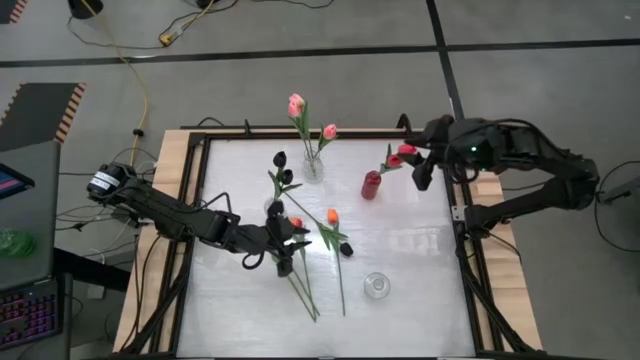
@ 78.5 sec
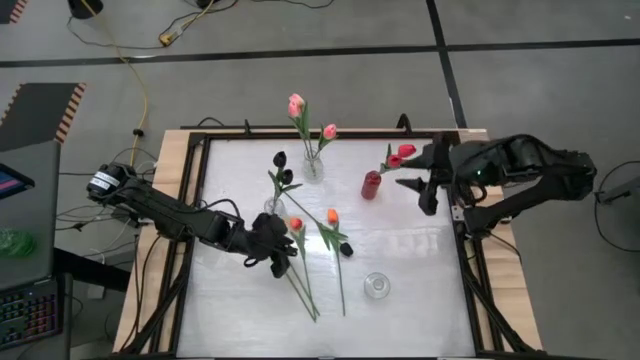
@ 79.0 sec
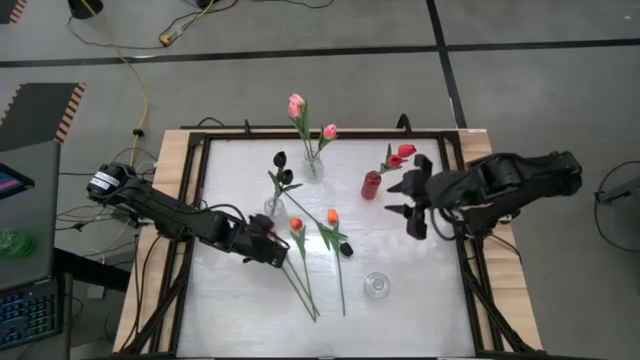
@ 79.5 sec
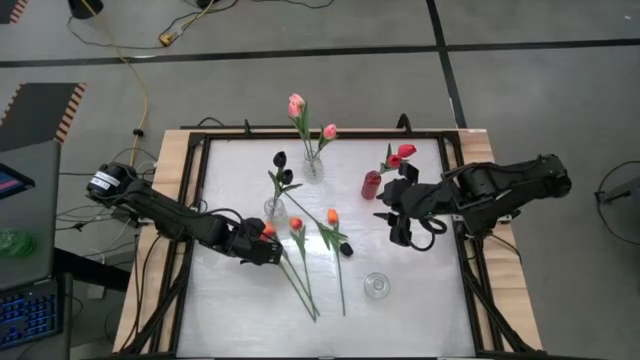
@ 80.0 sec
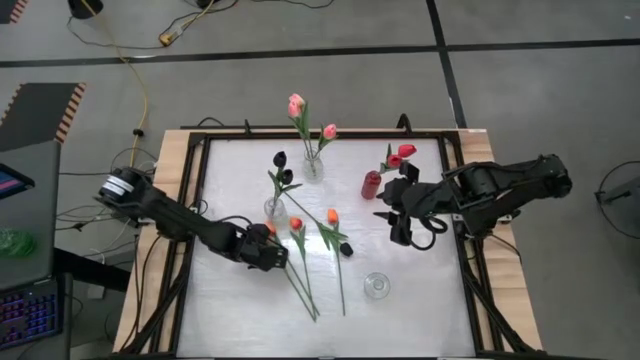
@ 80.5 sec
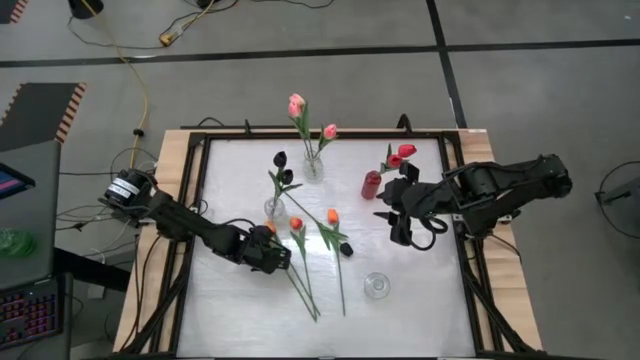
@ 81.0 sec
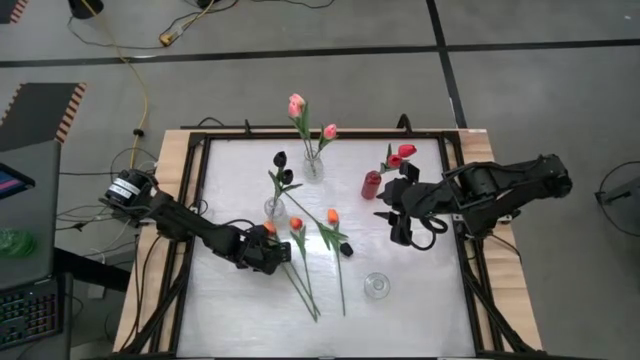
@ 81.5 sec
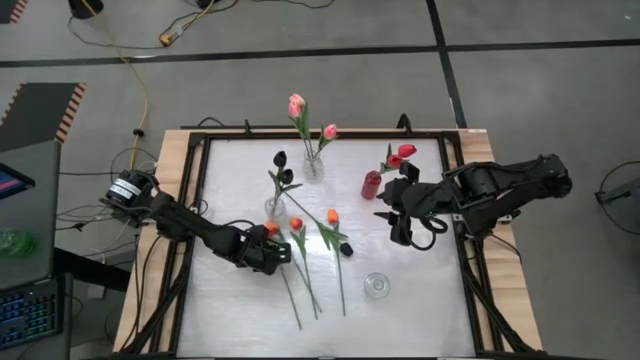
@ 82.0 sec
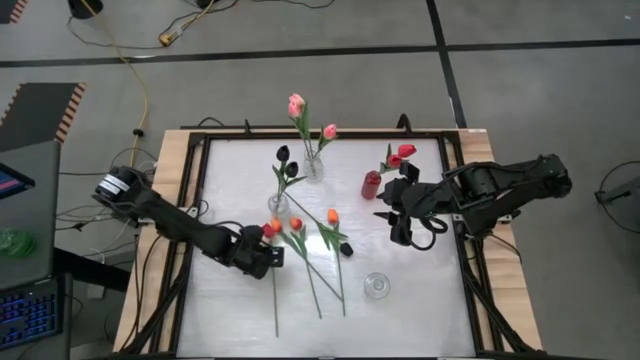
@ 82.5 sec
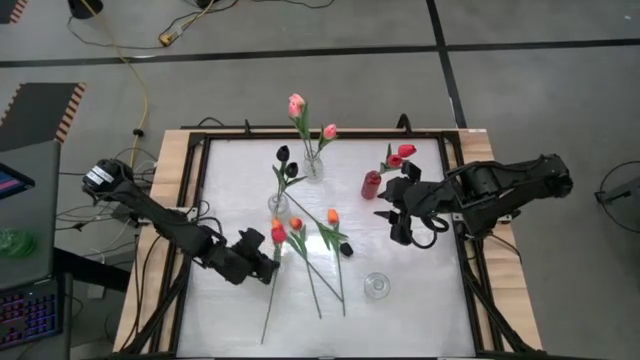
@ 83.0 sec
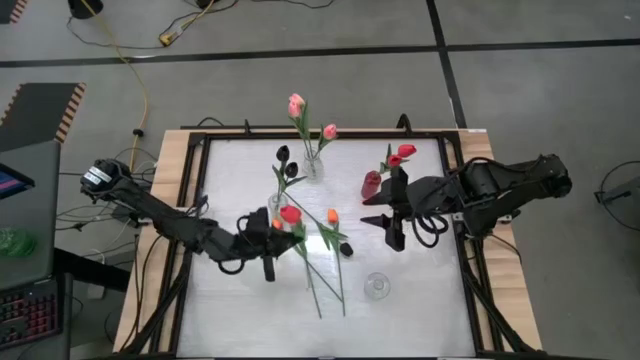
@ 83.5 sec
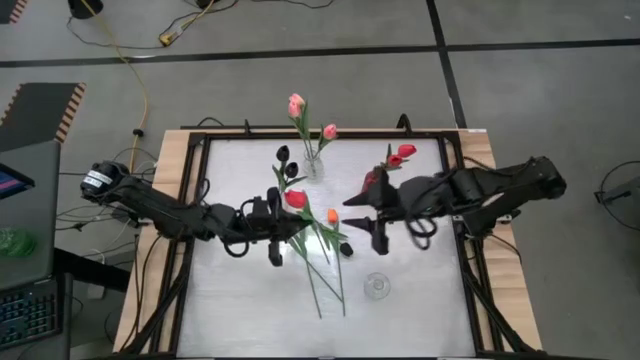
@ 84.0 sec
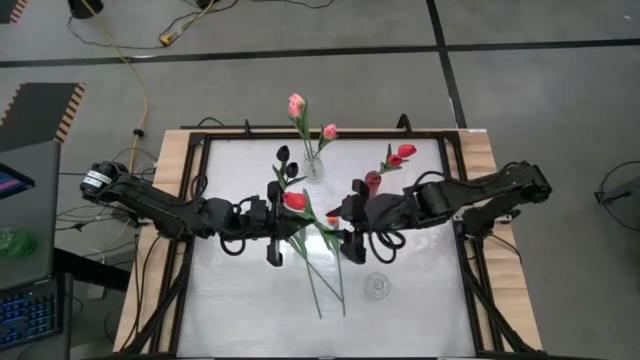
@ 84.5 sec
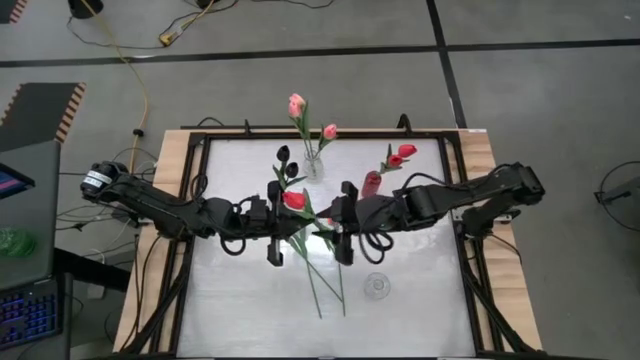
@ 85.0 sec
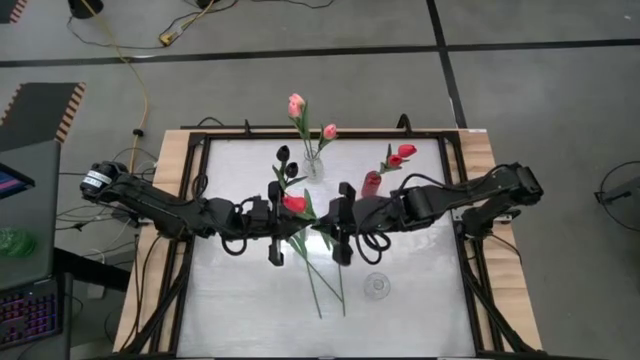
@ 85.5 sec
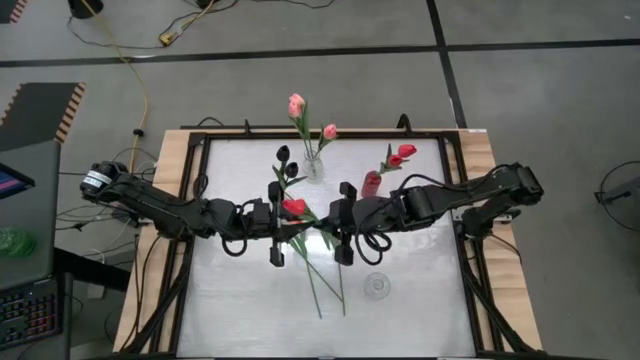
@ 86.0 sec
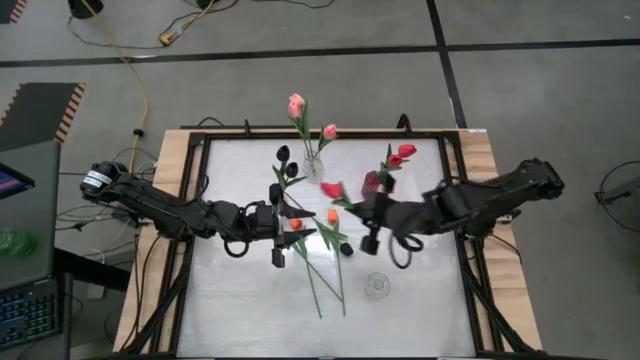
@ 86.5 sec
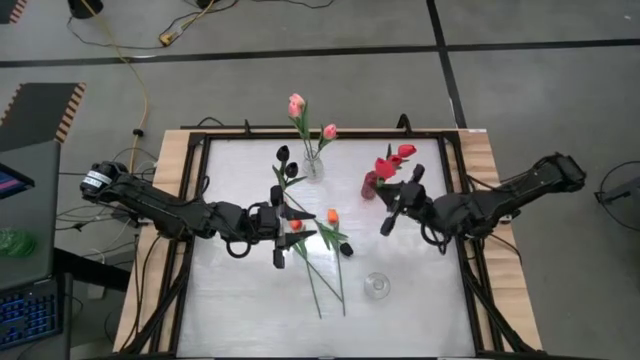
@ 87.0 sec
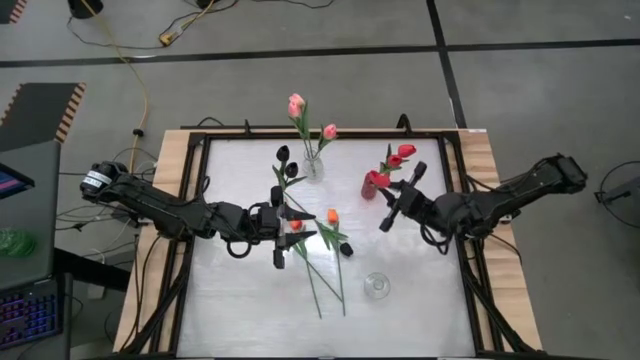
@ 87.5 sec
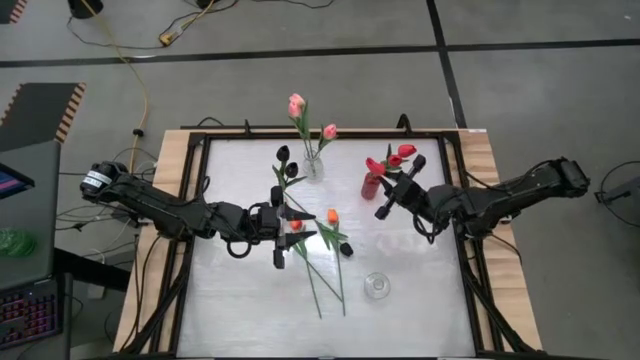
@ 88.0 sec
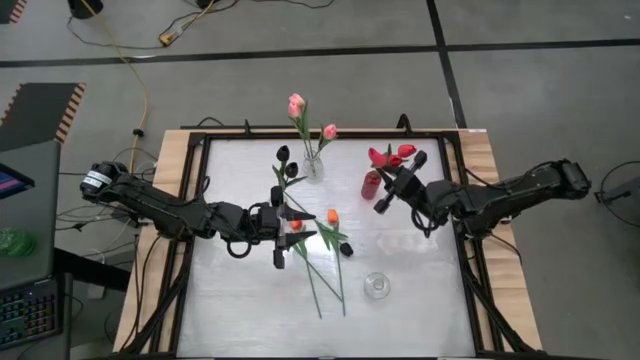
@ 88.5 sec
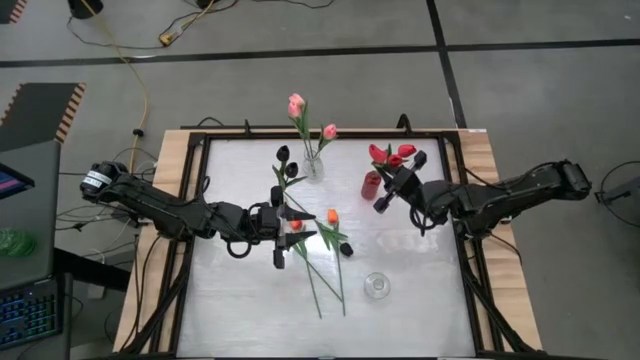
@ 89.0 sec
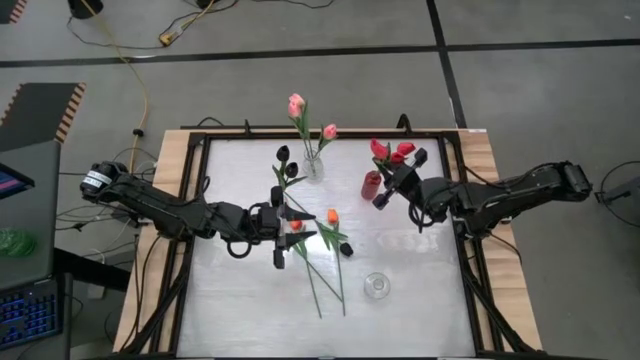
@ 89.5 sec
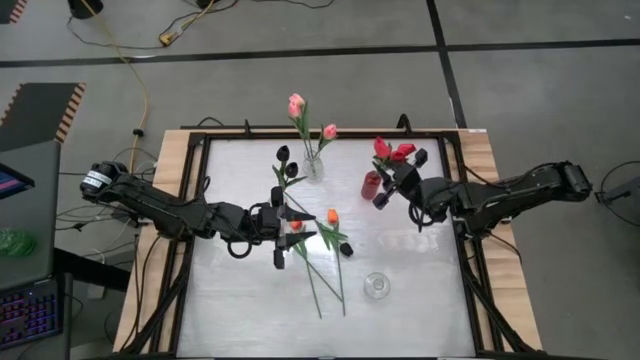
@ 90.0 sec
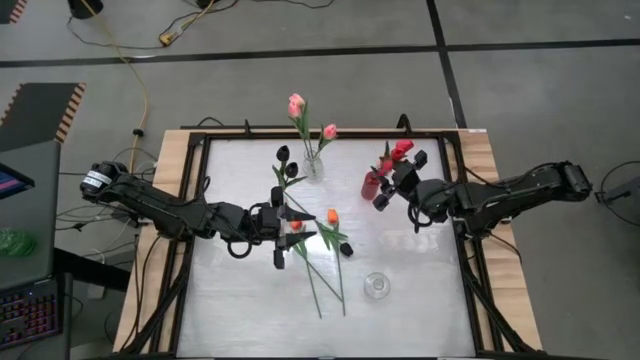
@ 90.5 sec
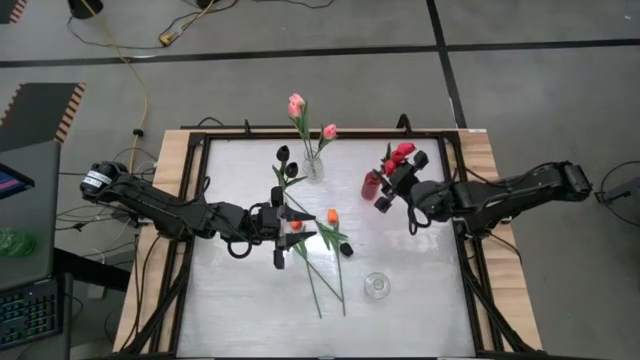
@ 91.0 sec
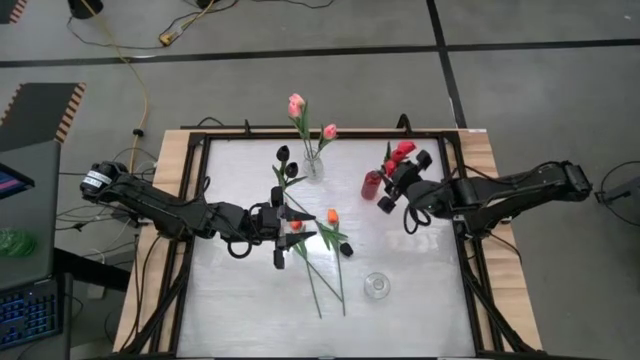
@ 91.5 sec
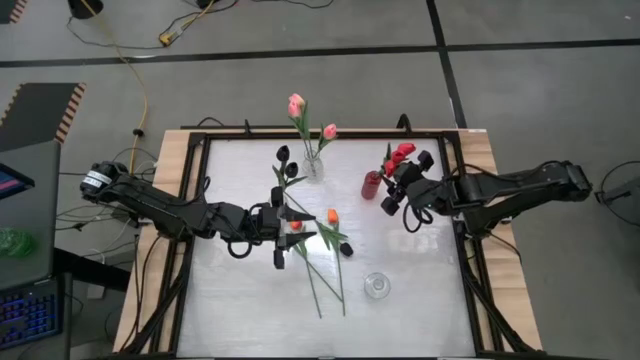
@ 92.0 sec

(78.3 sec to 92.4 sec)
Task: Sort flowers into vase by color
Put the red tulip into the red vase

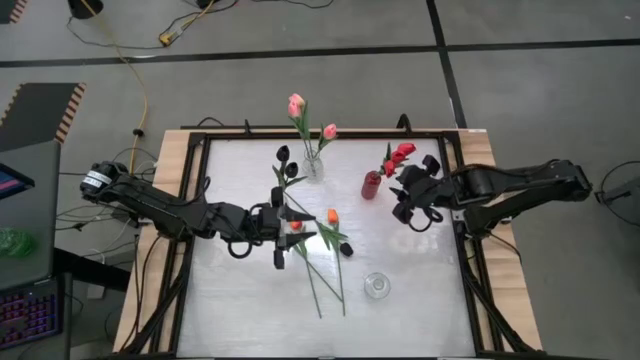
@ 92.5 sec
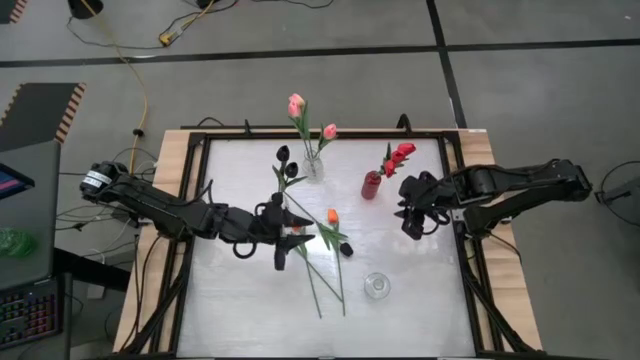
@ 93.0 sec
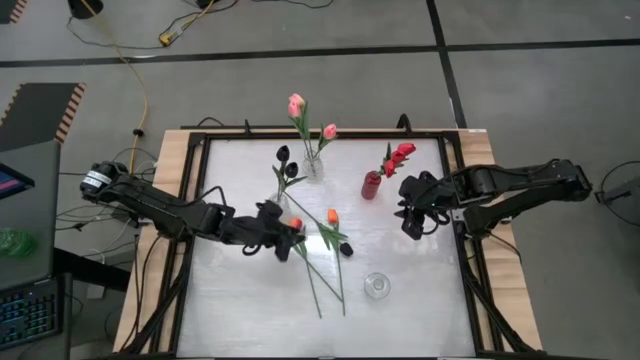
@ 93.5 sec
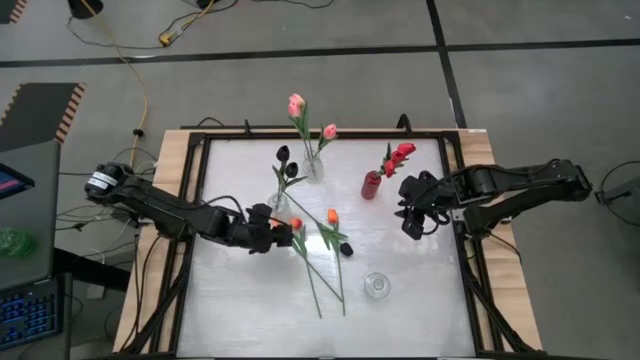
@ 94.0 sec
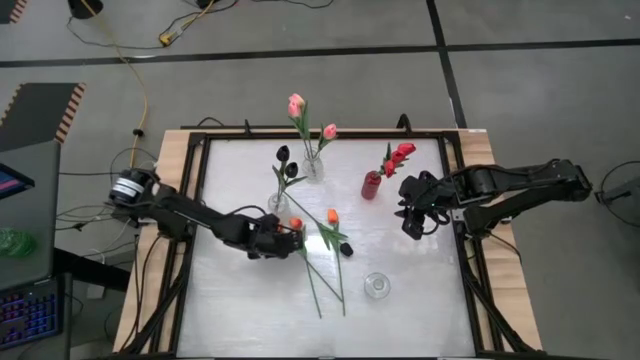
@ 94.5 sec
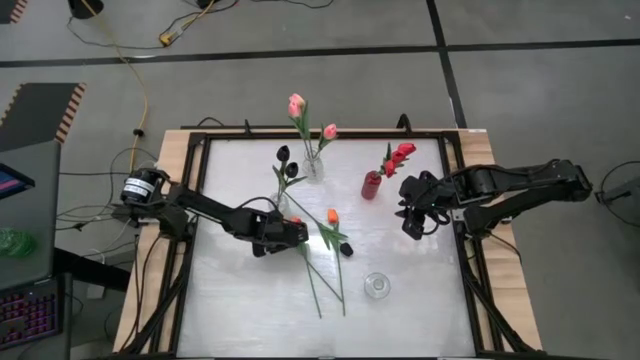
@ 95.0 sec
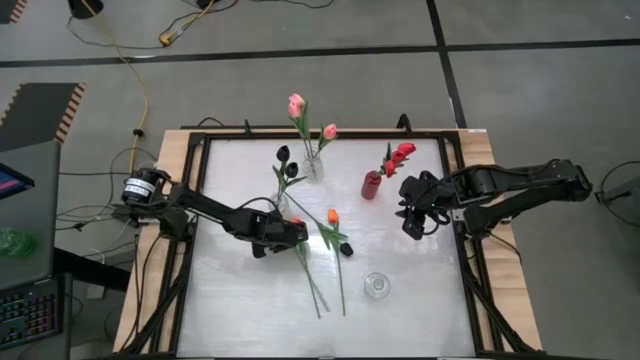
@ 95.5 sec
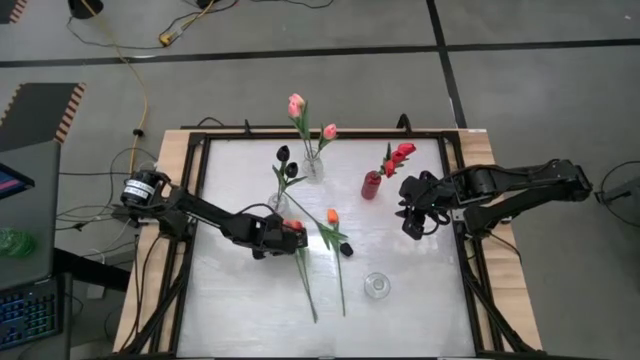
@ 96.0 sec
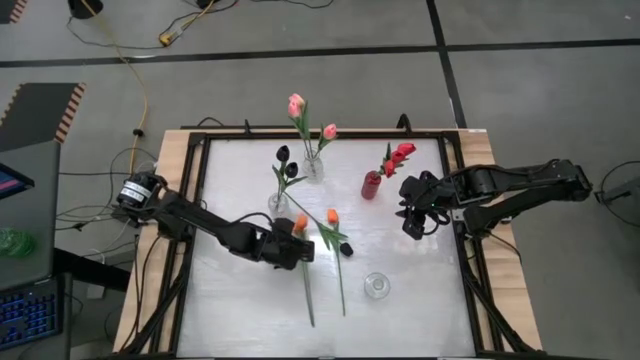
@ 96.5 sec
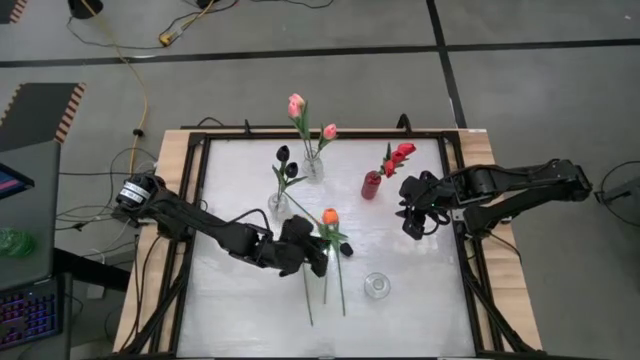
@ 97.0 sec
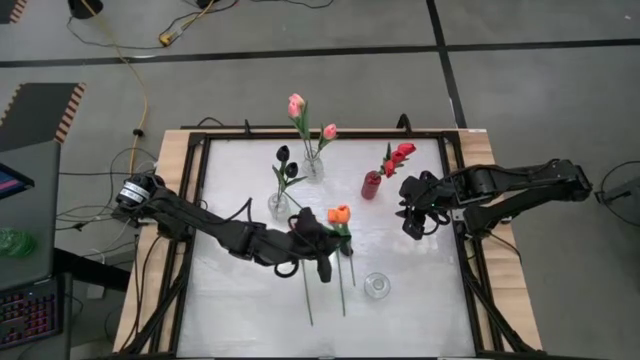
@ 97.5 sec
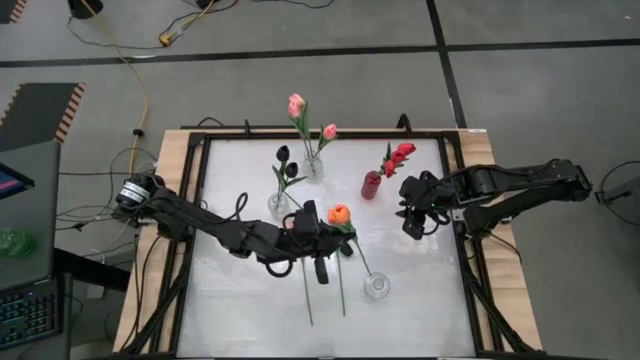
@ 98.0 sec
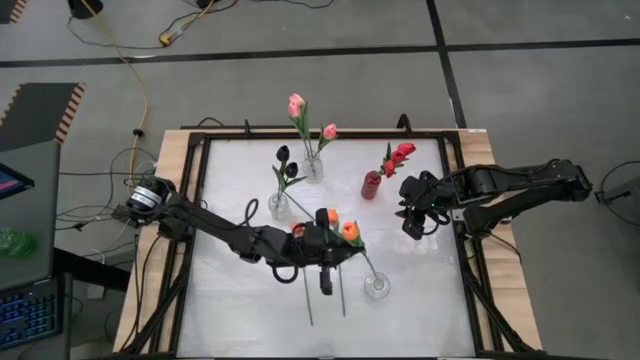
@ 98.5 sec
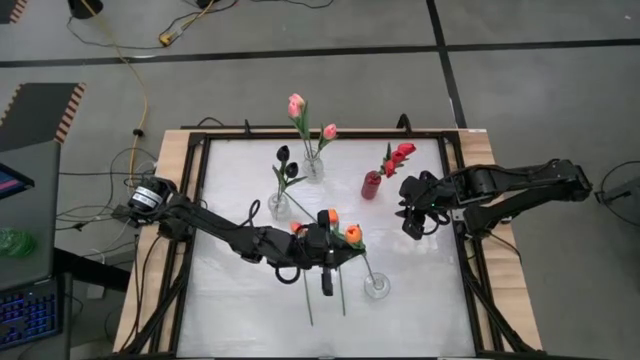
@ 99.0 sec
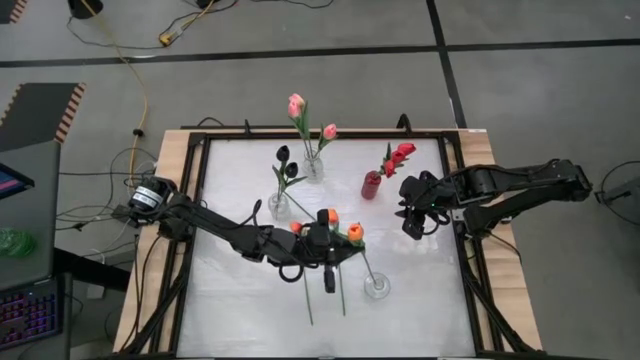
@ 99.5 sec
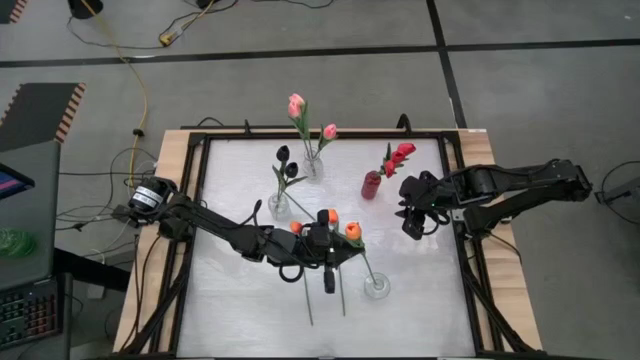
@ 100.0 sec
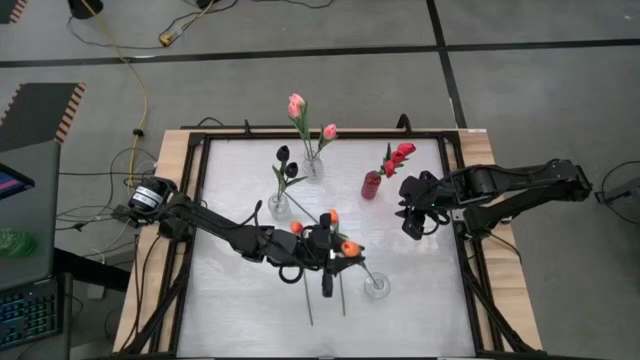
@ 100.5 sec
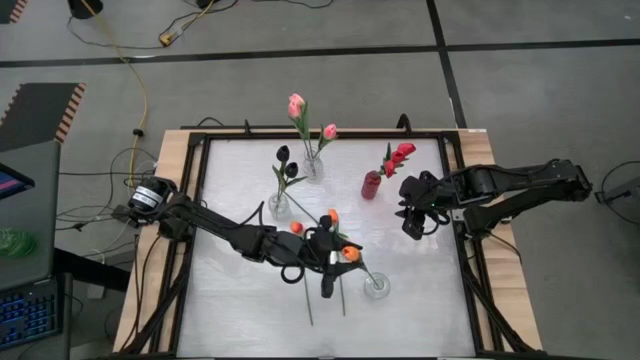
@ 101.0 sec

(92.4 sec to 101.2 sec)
Put the orange tulip into the bottom transparent vase
